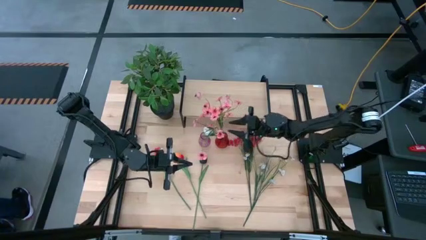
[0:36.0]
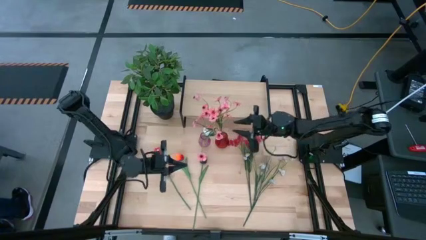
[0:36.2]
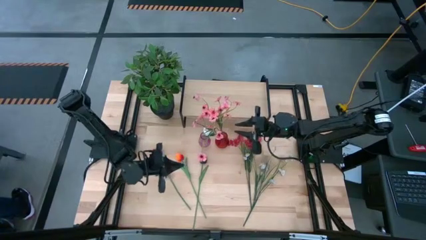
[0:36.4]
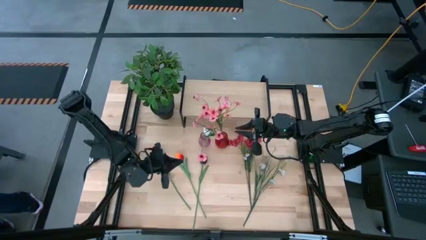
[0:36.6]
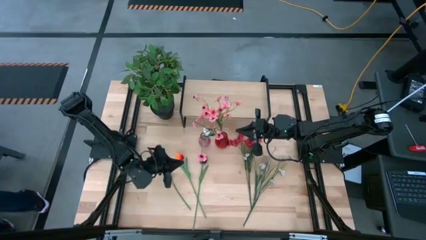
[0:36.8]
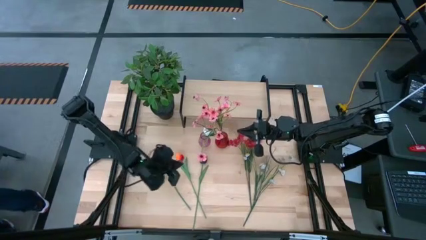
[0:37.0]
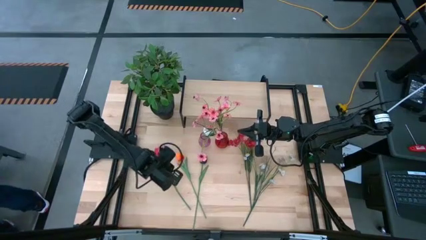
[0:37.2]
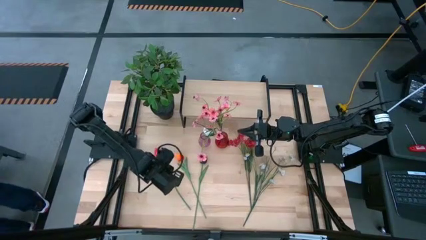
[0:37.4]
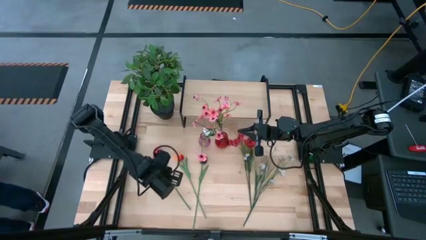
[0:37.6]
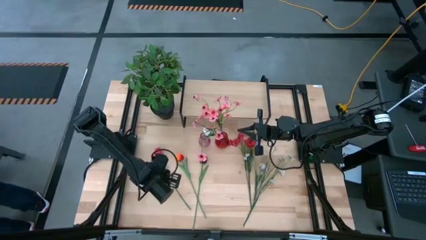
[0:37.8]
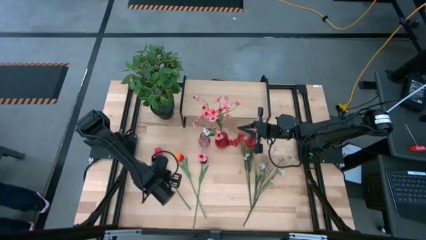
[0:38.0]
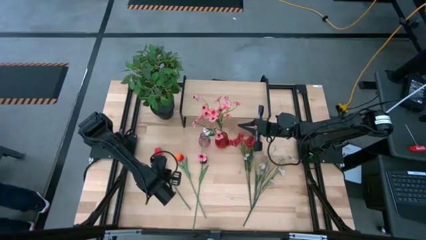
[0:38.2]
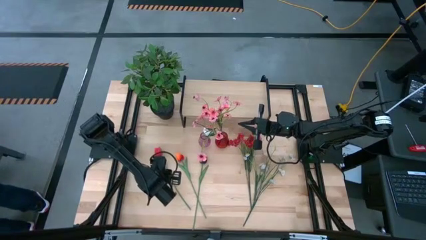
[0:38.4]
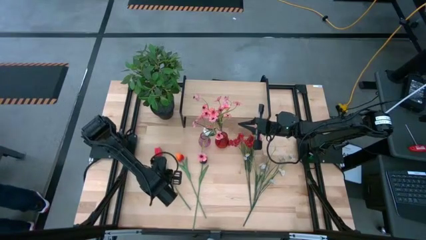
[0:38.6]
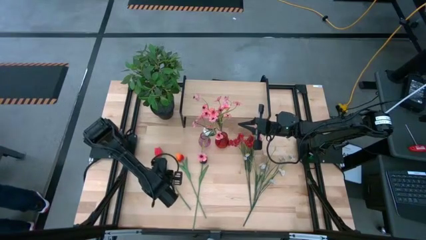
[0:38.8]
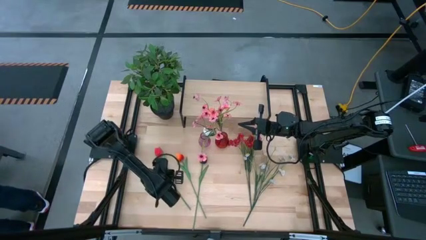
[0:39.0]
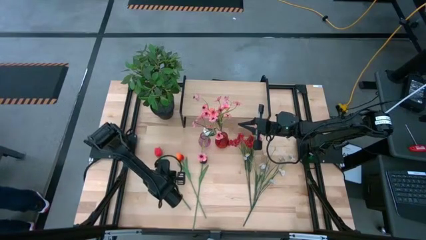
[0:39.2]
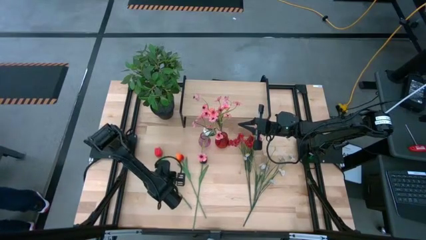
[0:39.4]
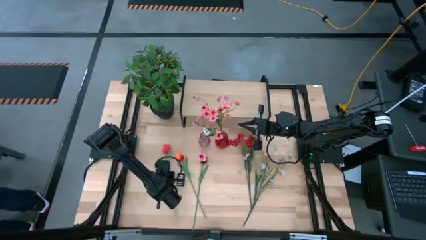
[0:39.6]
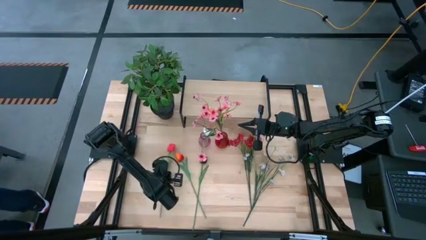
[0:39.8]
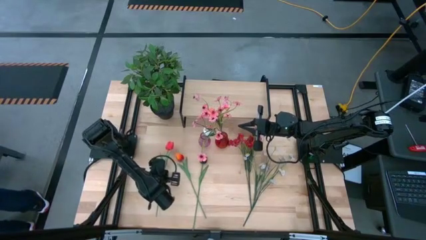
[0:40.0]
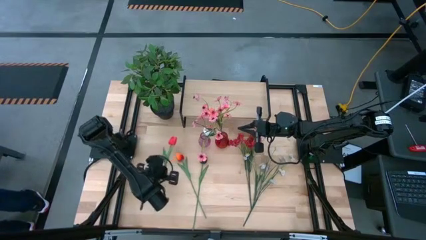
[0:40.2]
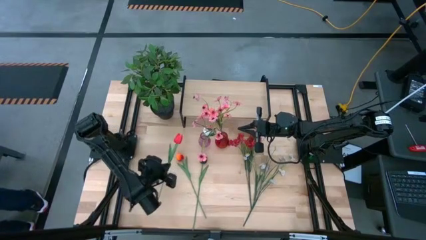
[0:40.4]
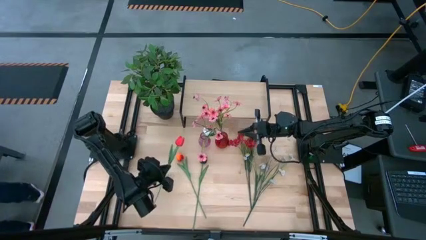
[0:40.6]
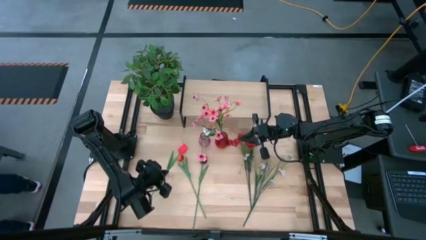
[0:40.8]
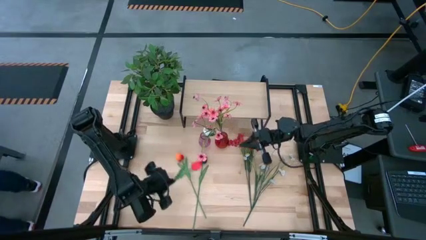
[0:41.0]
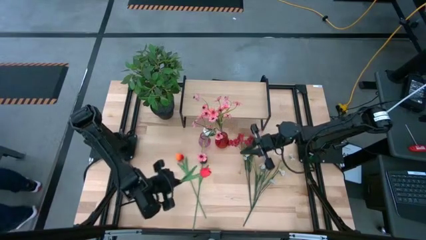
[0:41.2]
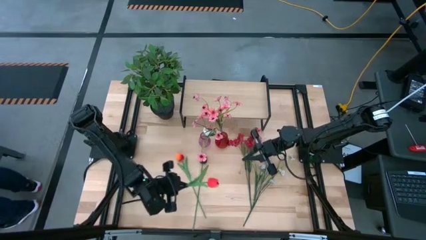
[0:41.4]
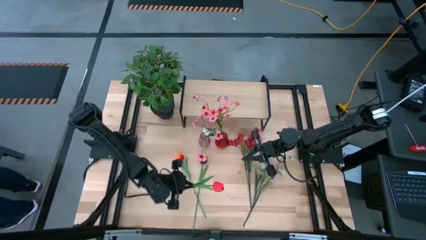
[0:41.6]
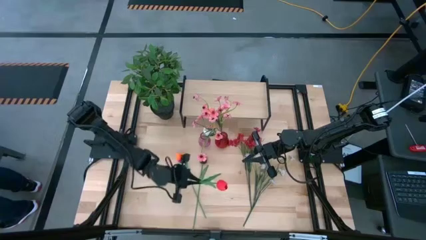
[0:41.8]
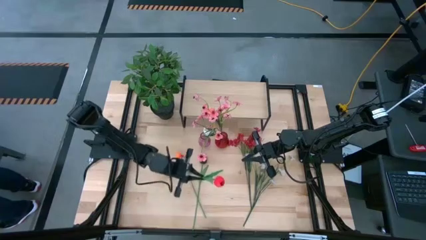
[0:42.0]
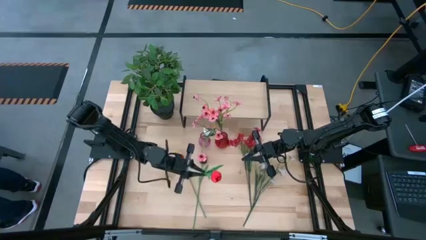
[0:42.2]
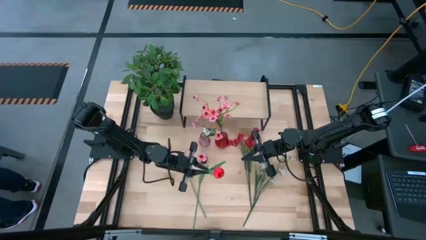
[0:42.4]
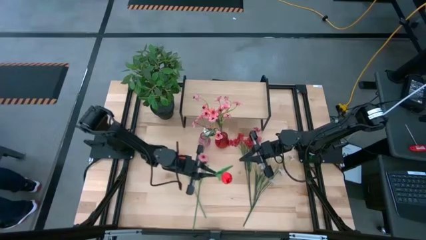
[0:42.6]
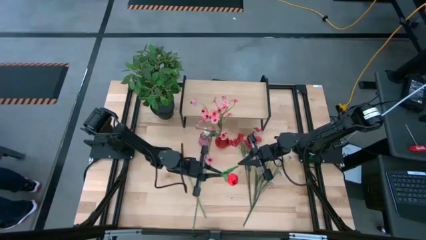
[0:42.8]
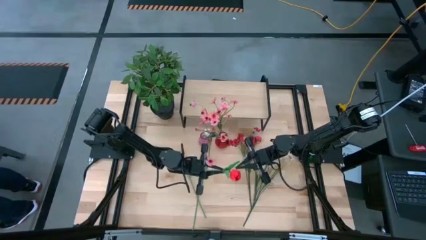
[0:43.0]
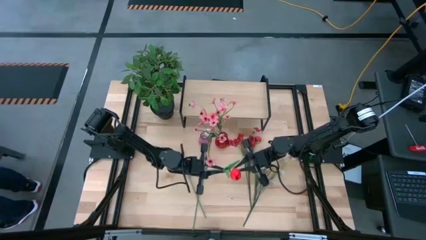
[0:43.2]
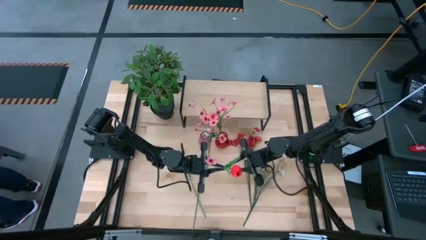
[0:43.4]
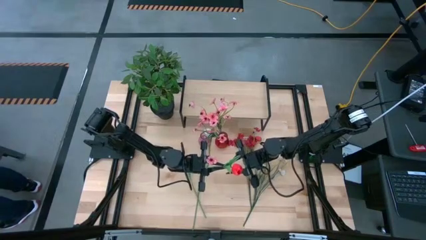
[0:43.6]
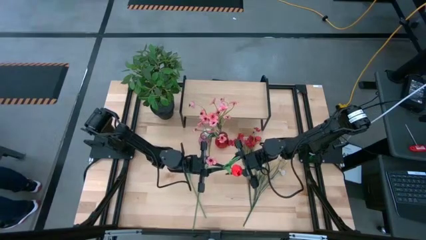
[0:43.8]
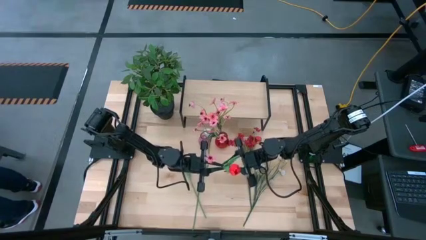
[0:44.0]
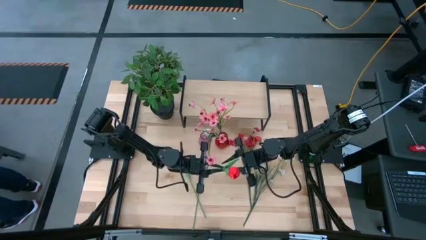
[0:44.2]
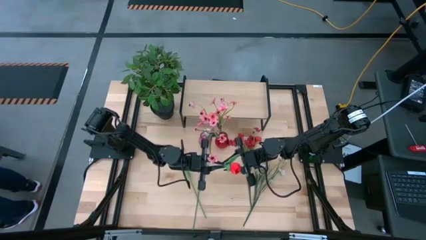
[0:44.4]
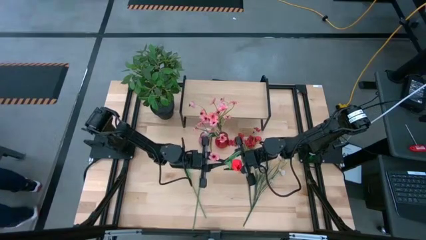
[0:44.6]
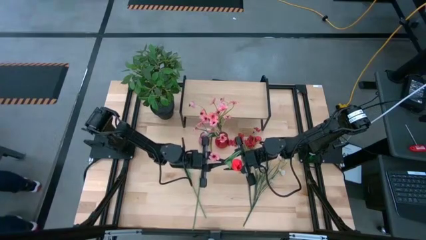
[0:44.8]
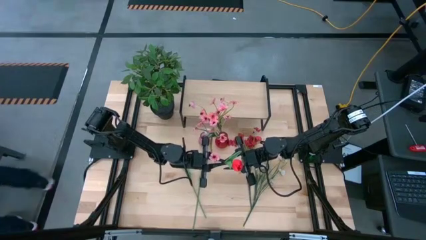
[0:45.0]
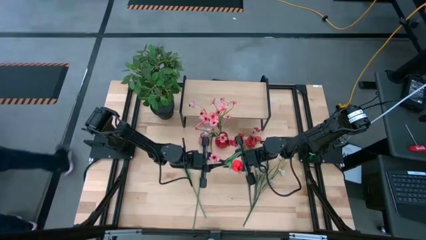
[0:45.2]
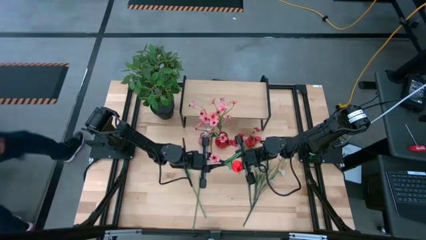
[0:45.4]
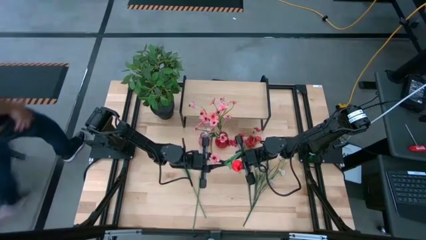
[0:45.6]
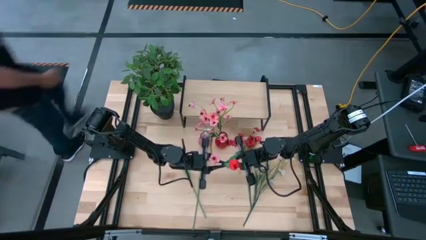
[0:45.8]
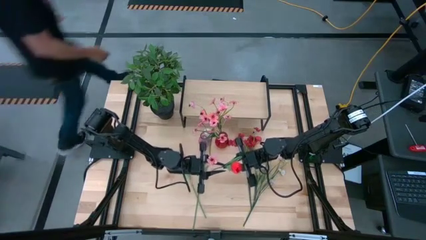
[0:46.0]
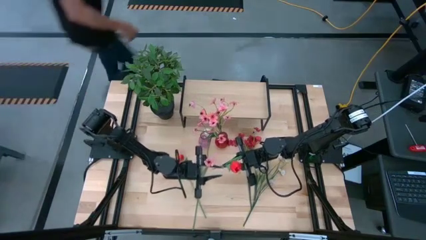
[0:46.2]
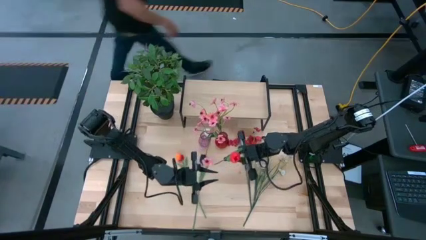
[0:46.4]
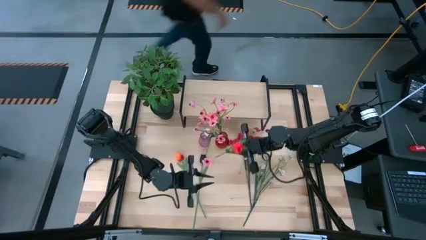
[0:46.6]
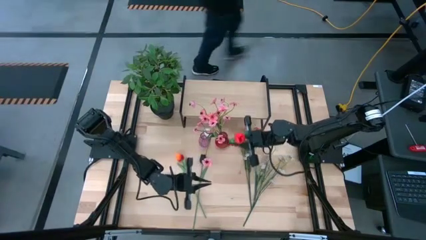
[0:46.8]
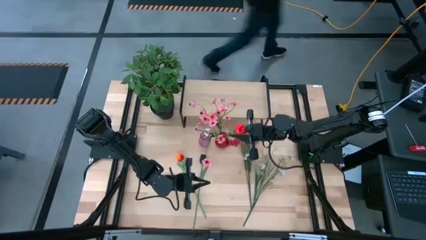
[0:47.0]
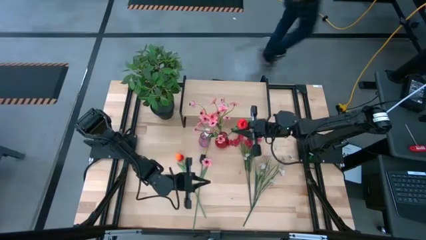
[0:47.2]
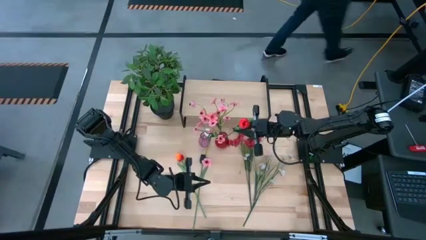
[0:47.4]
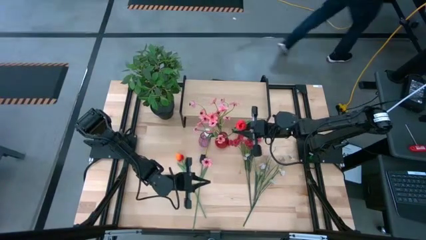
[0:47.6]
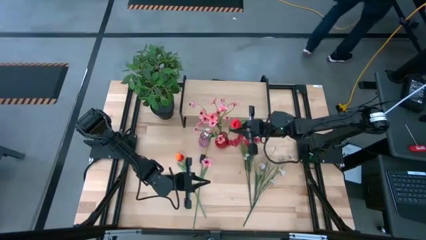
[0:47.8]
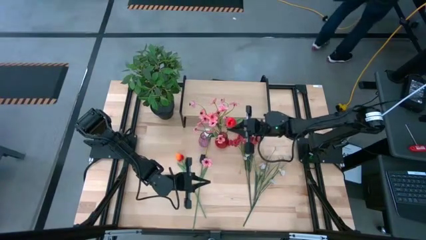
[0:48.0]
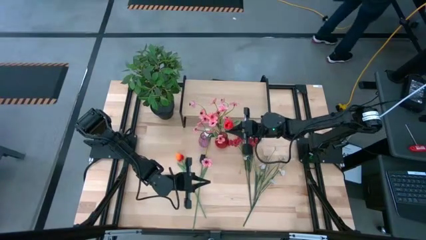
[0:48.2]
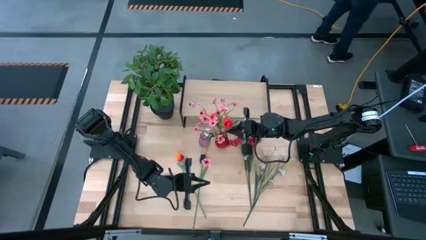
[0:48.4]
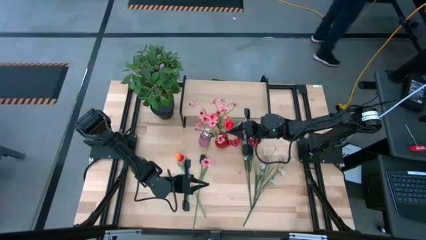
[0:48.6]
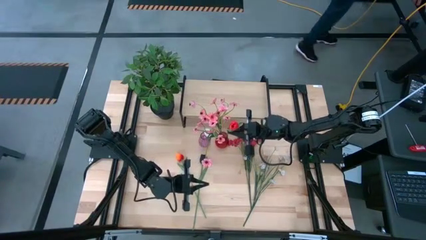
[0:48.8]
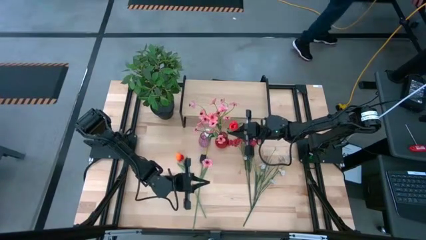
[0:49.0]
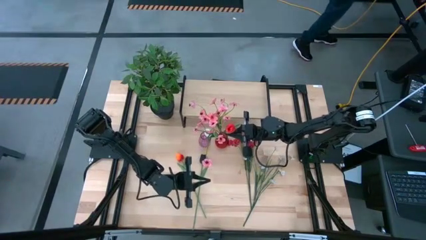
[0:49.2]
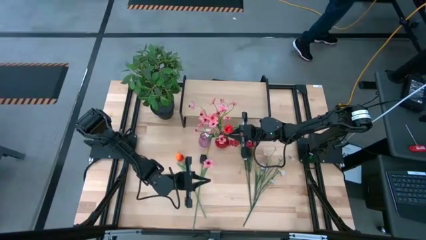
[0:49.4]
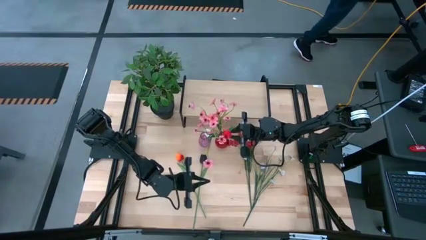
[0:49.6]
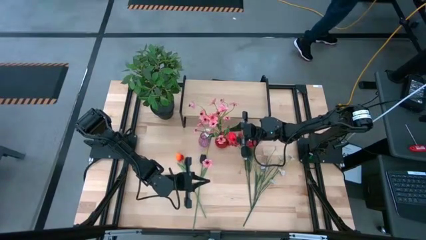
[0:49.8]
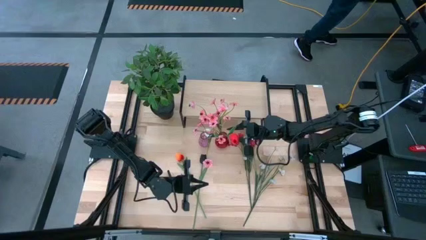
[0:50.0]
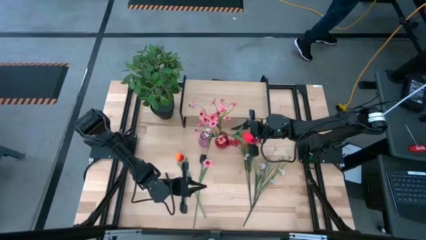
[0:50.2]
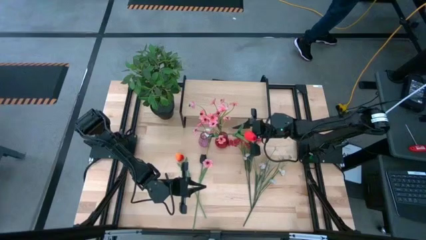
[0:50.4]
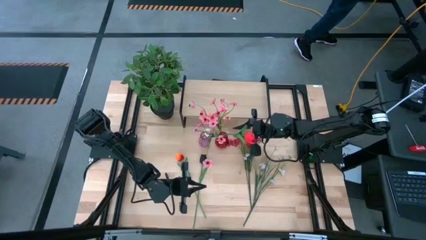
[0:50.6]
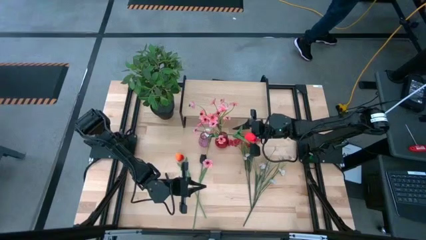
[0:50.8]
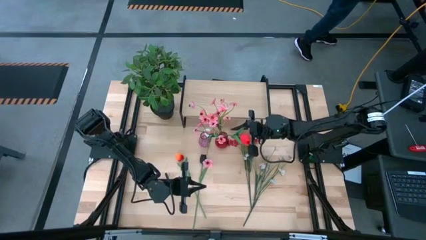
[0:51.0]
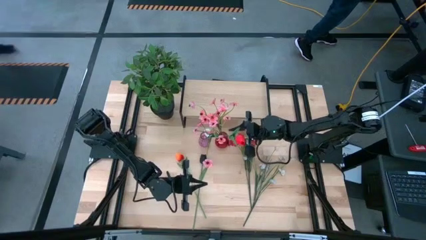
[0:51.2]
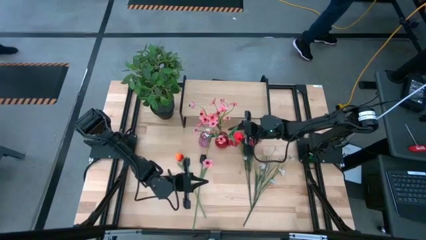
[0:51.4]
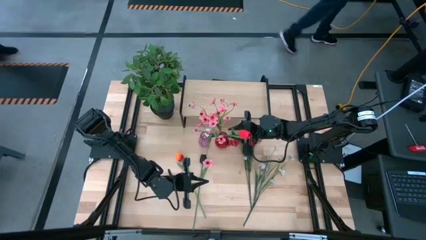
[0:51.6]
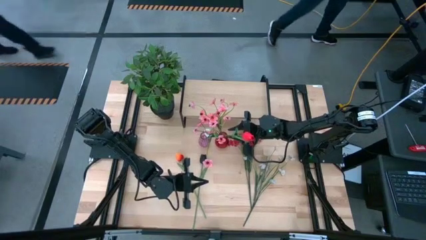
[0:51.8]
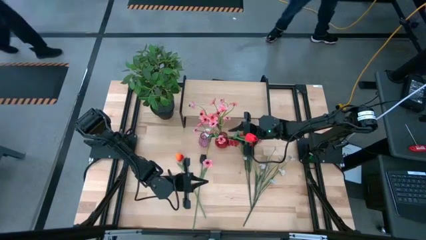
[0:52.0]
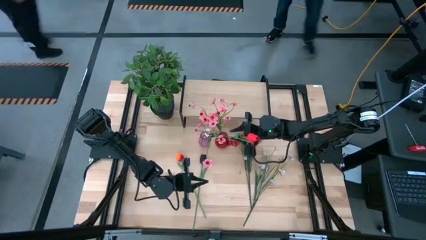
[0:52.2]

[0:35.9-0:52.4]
Task: Pick and place flowers into a vace then onto a shelf
Put the red flower into the red vase
